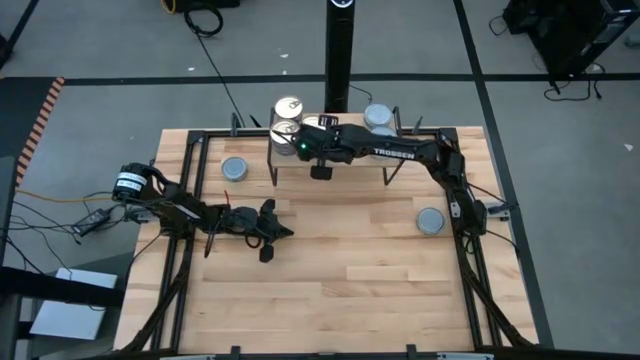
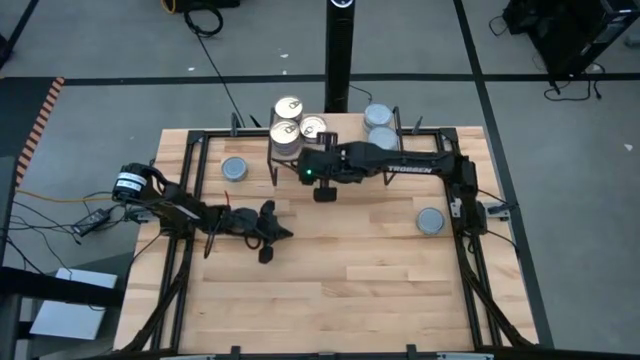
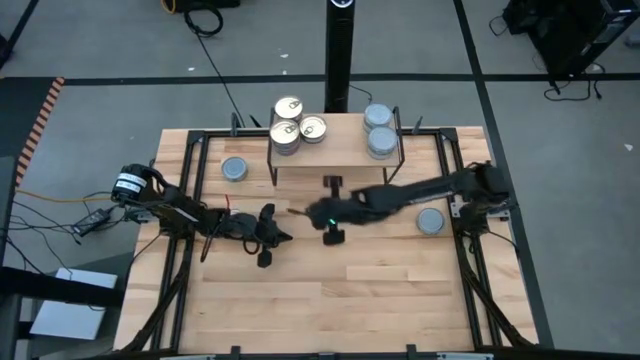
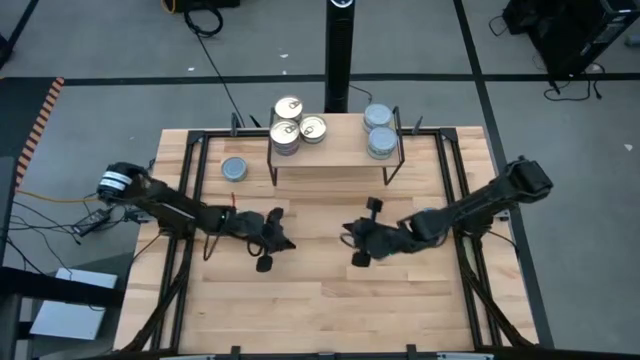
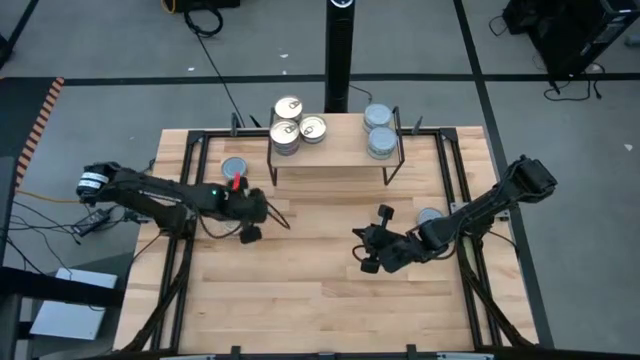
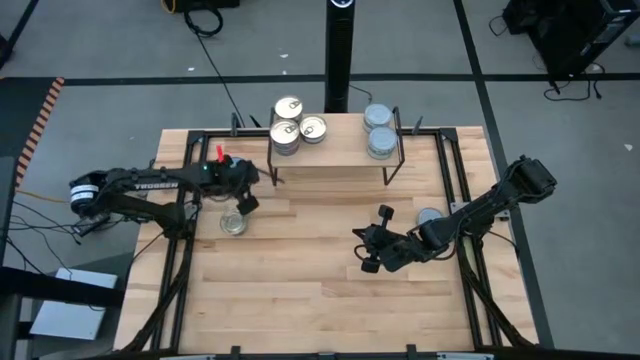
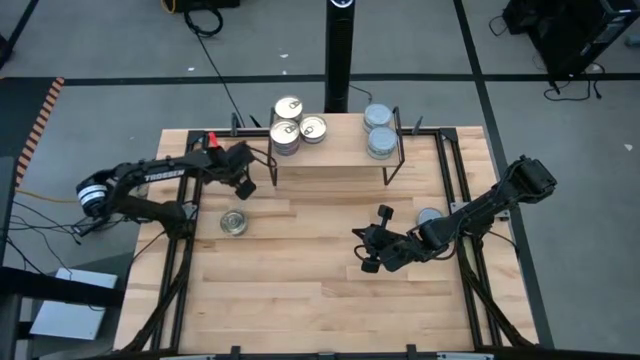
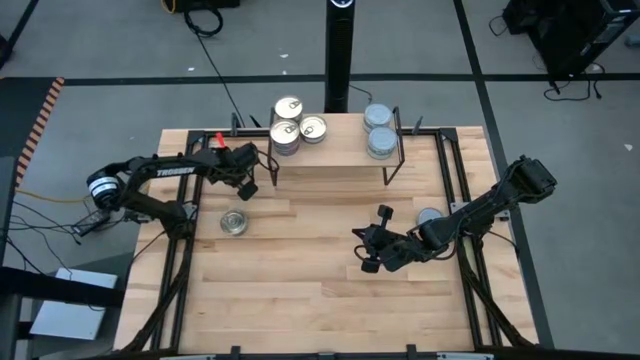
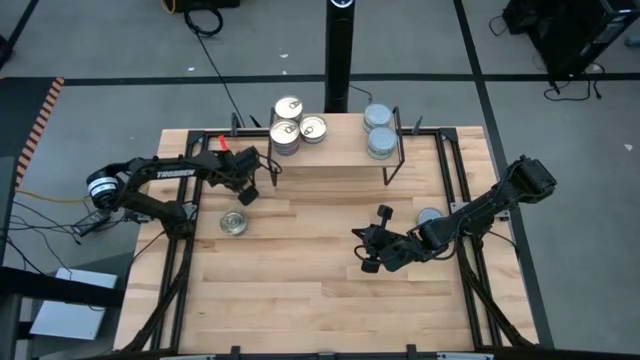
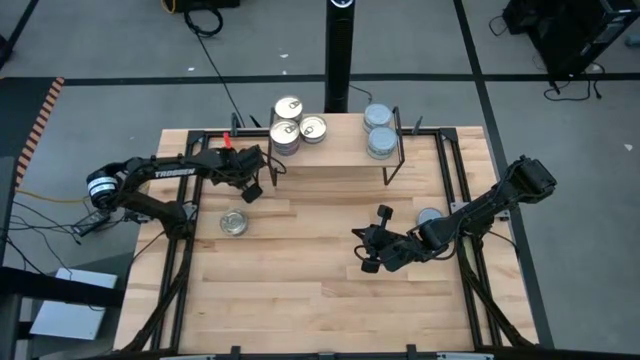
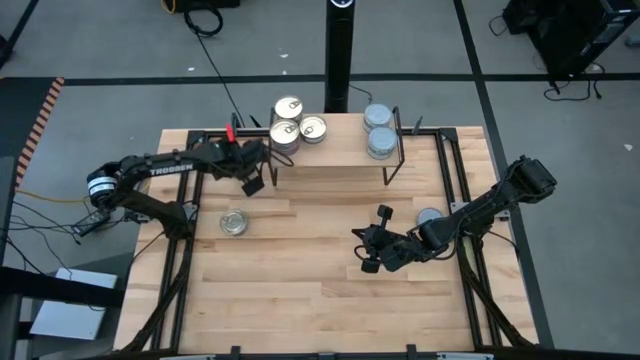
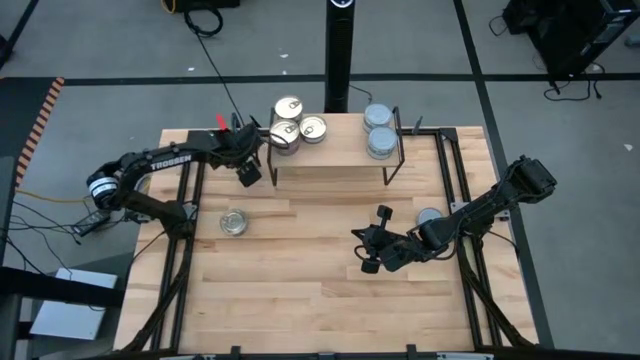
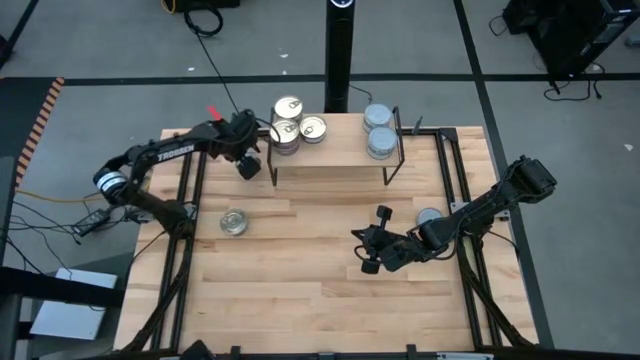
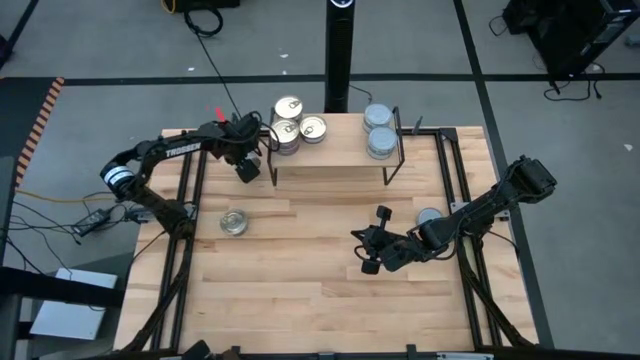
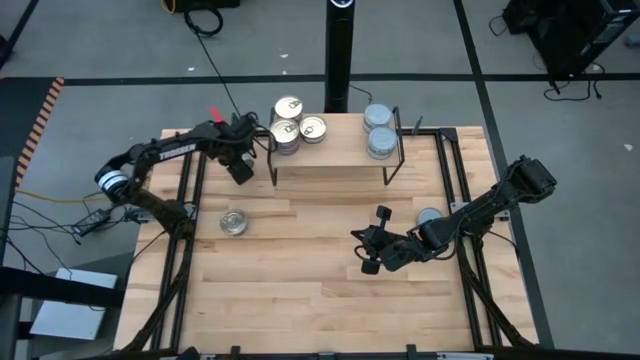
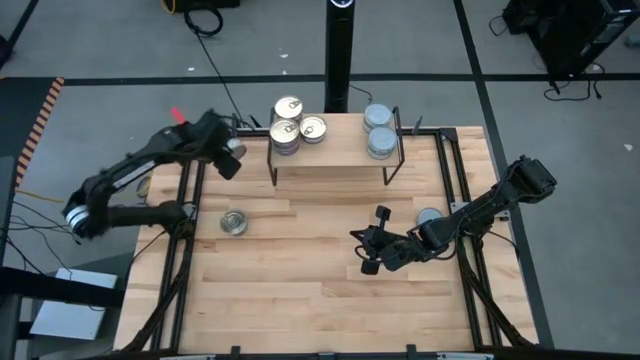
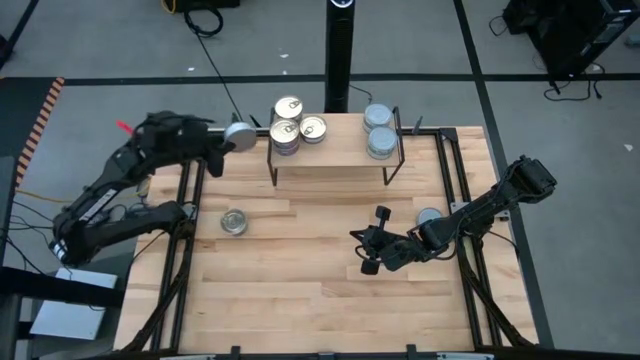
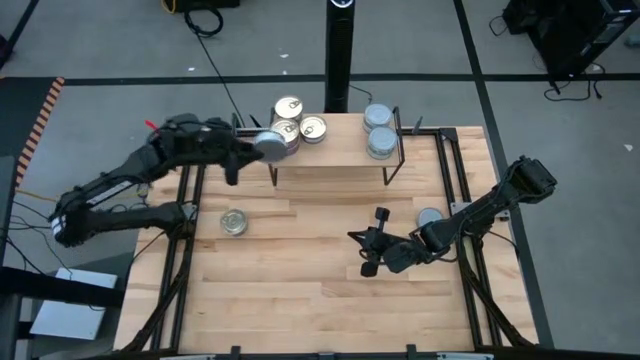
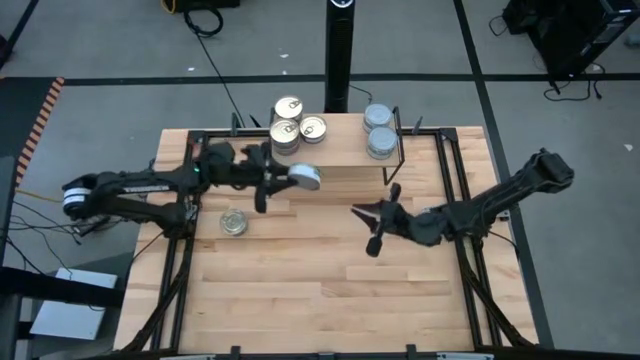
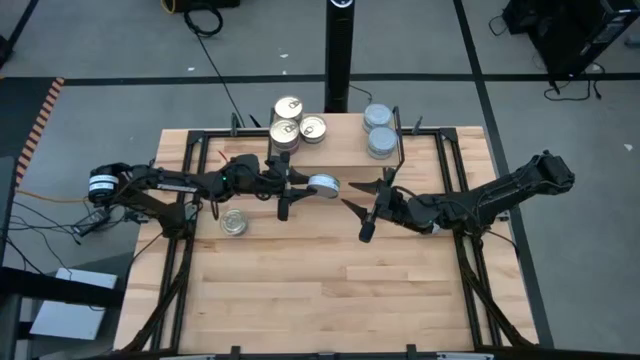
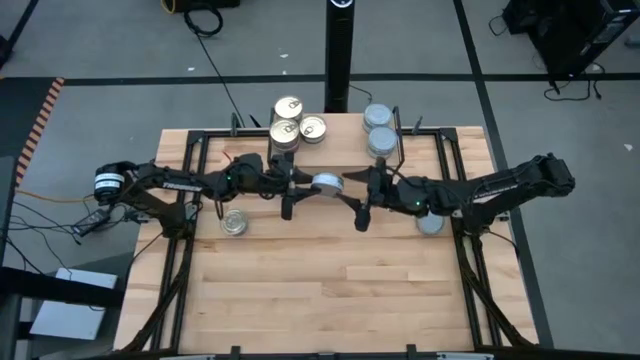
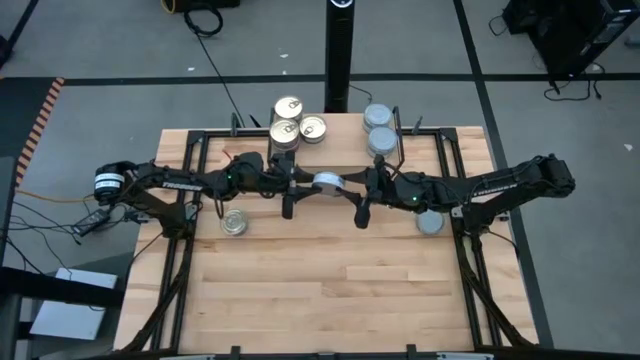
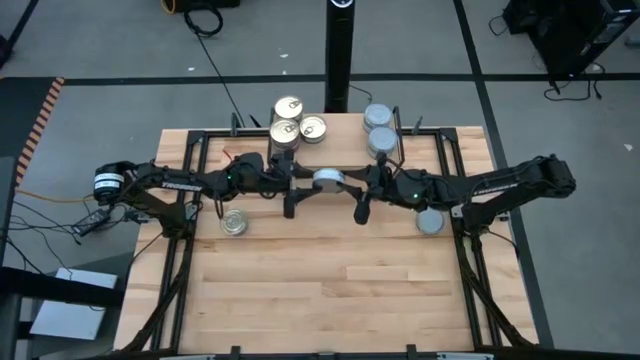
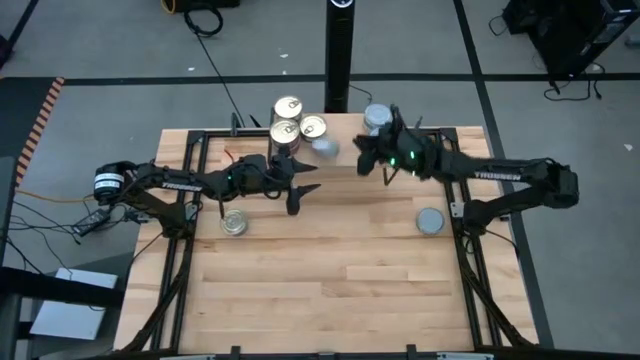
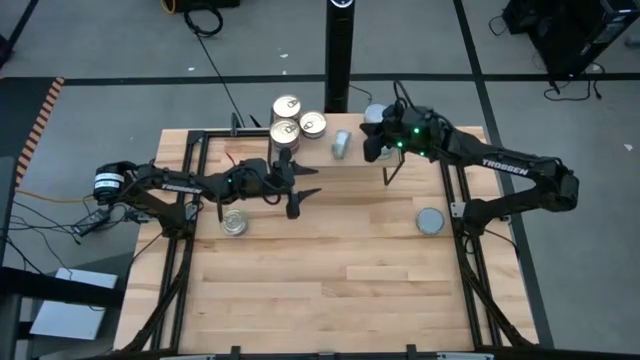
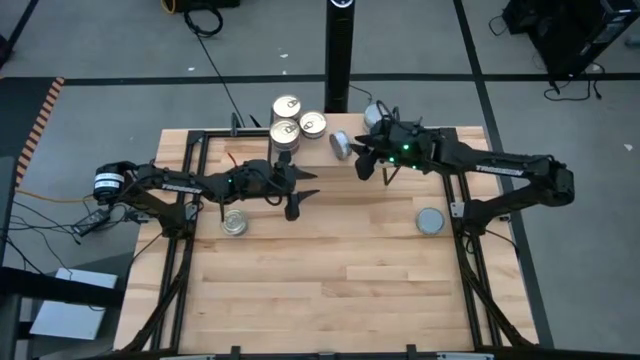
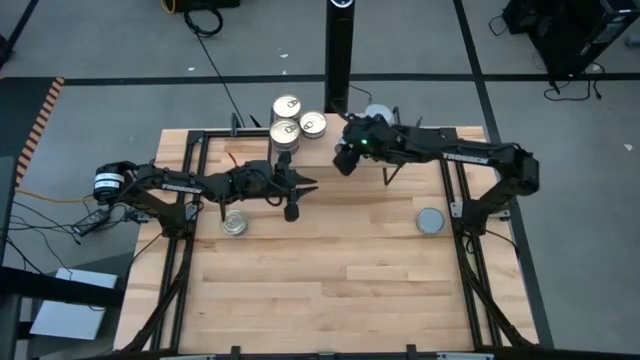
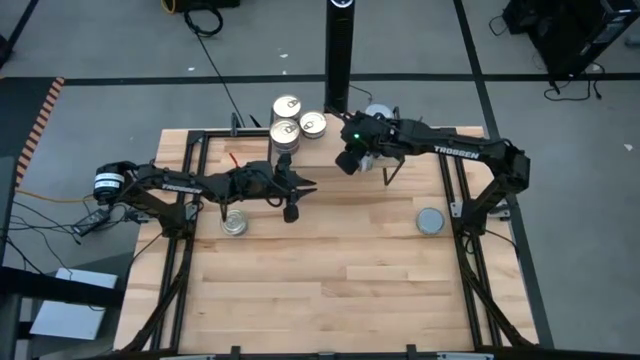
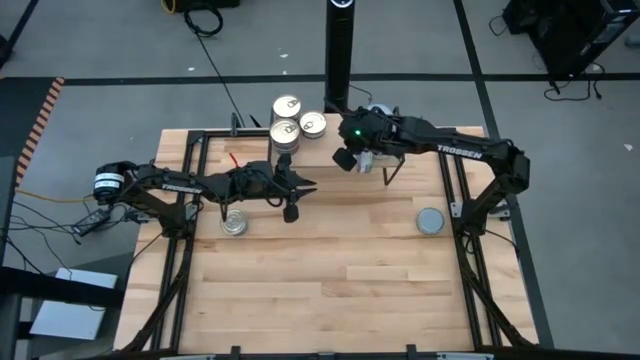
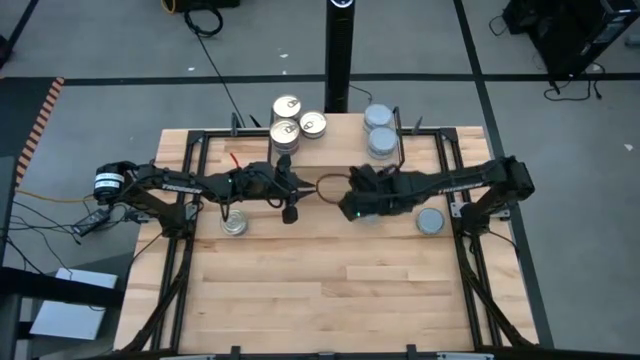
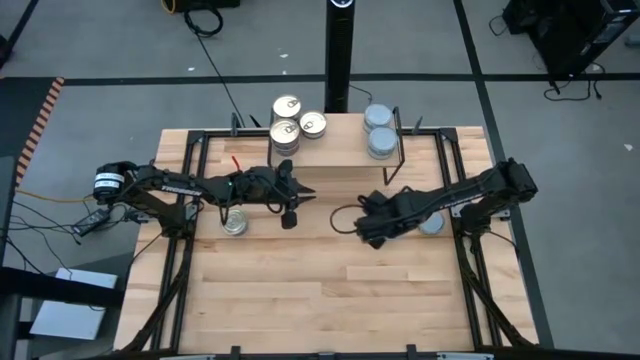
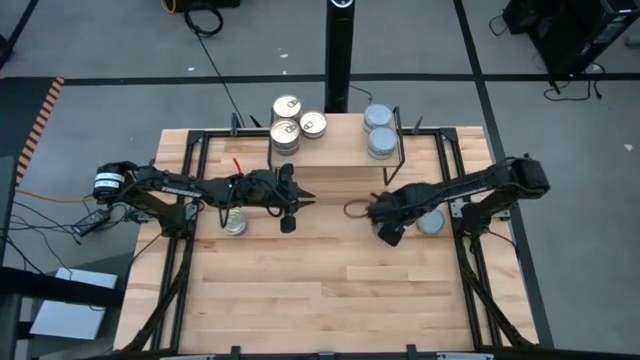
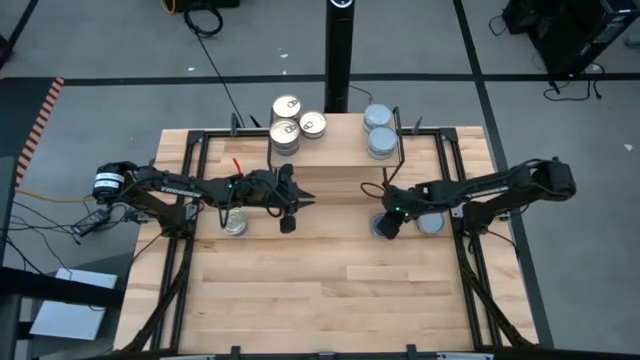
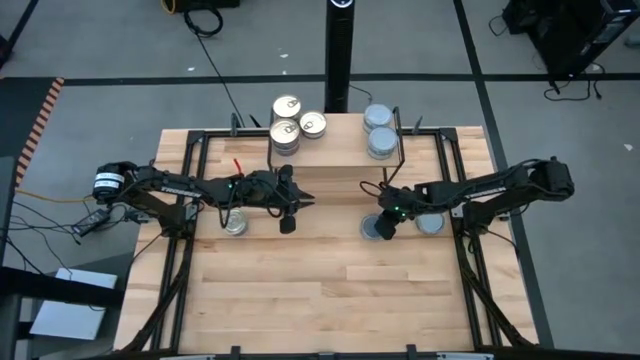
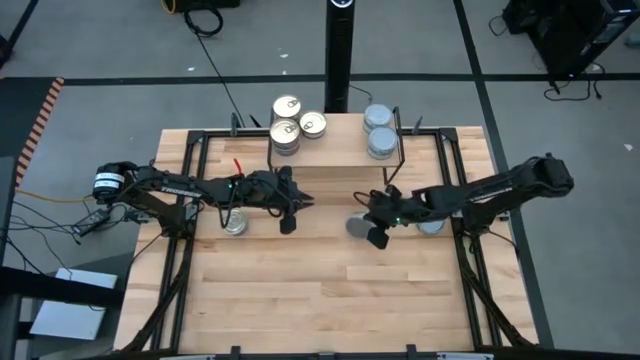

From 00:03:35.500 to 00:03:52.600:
Task: Stack canned seafood by type on shelf
Put the green tuna can on the shelf

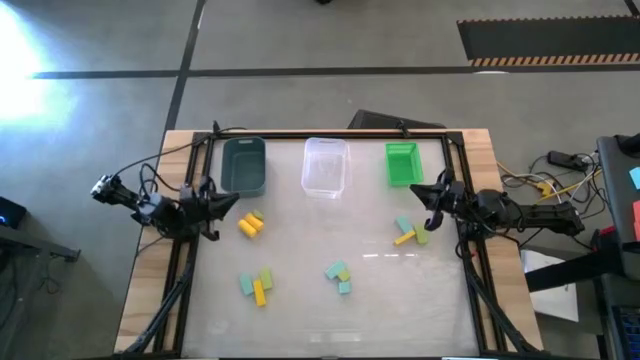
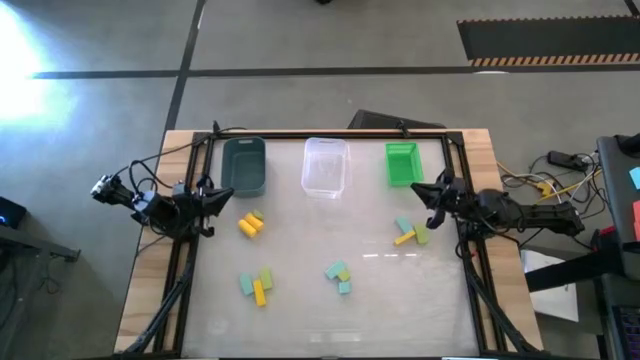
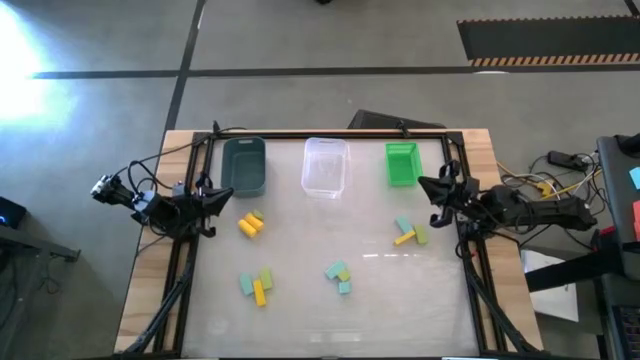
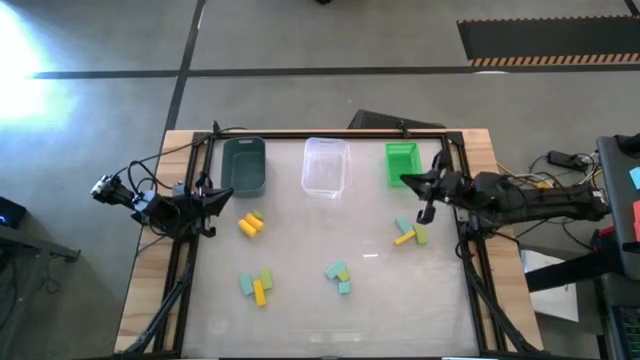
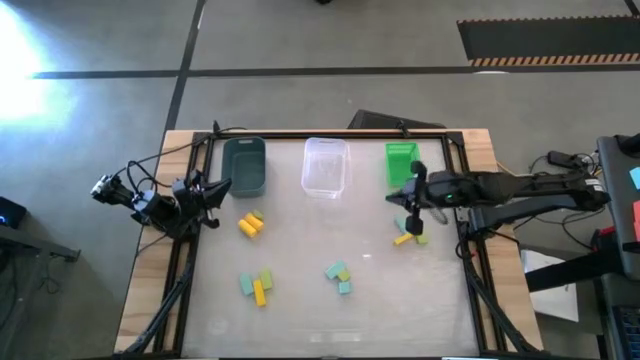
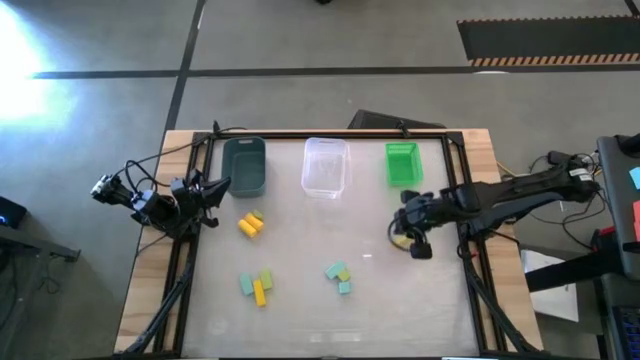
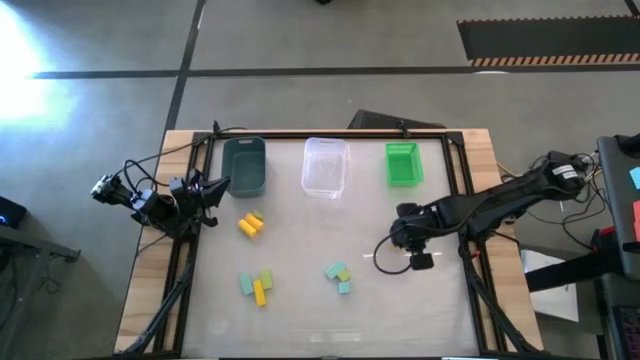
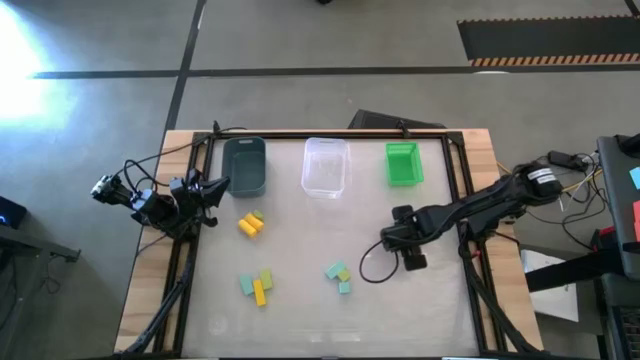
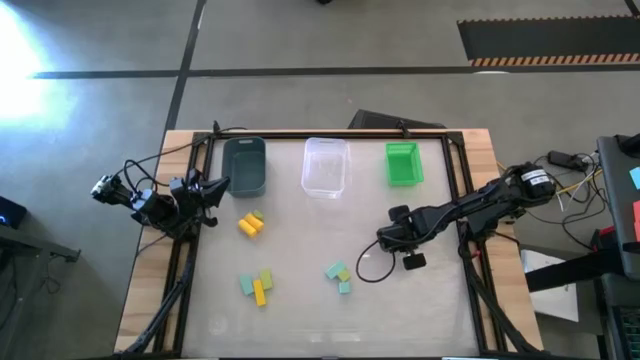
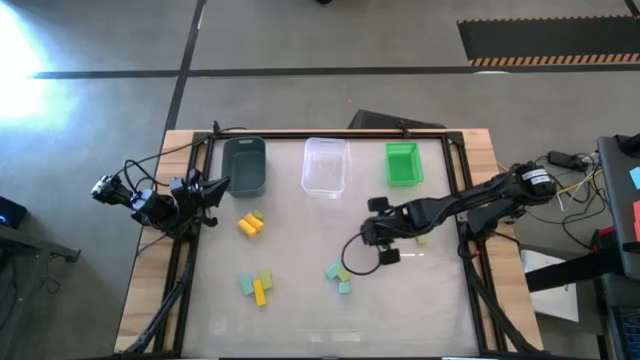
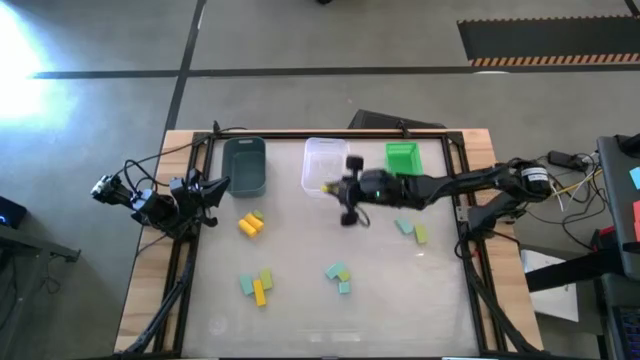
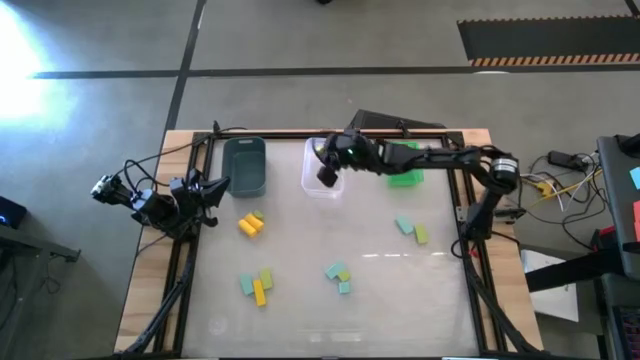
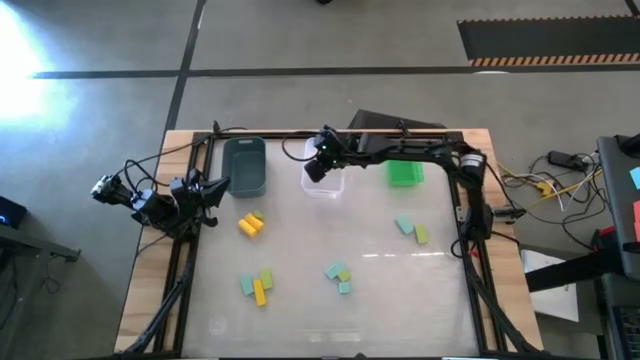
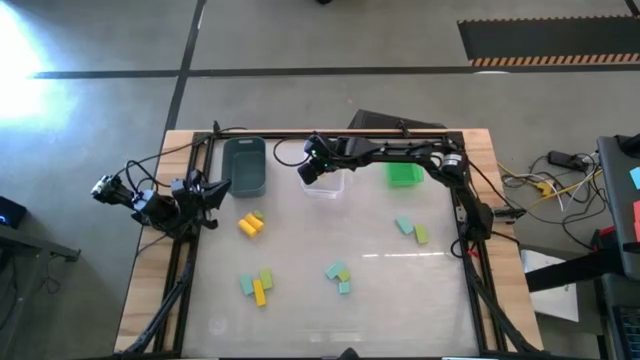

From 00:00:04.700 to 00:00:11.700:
Task: Sort & place blocks by color
Put the yellow block into the transparent bin
